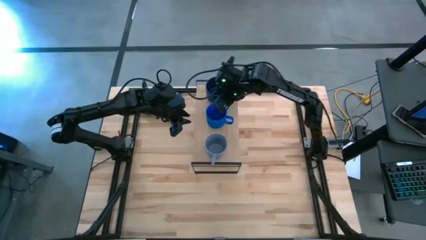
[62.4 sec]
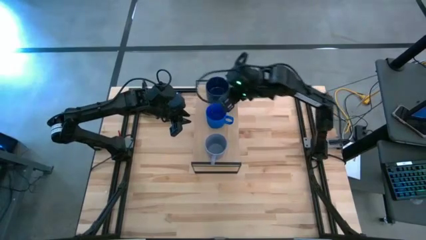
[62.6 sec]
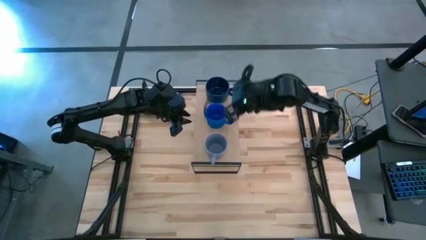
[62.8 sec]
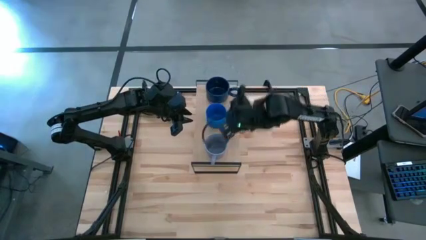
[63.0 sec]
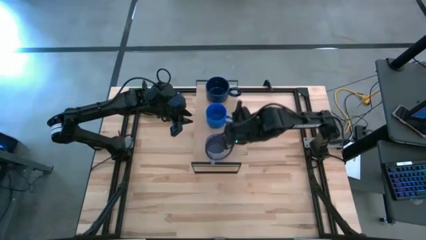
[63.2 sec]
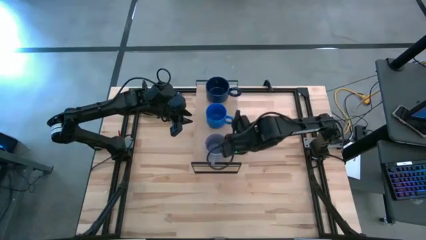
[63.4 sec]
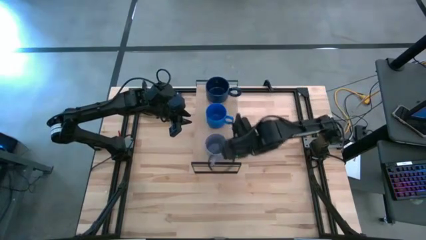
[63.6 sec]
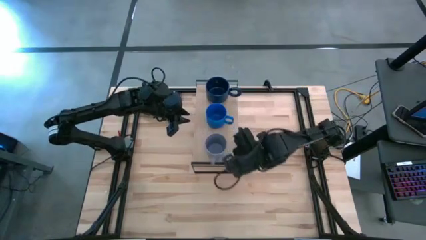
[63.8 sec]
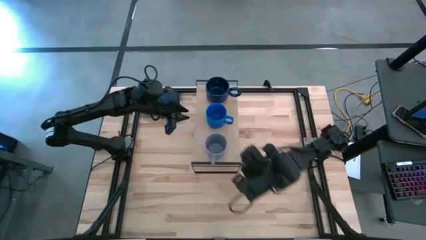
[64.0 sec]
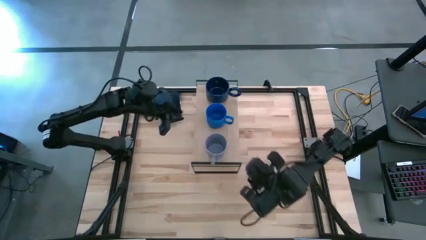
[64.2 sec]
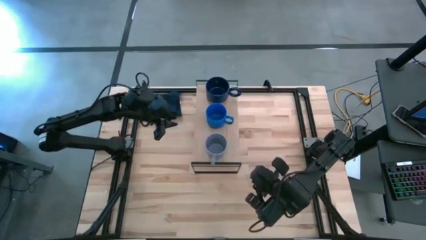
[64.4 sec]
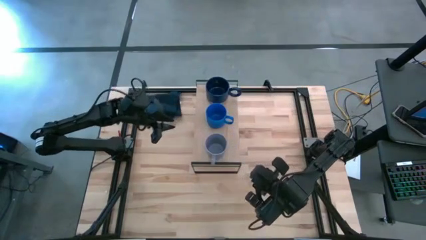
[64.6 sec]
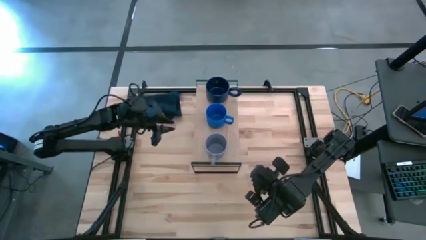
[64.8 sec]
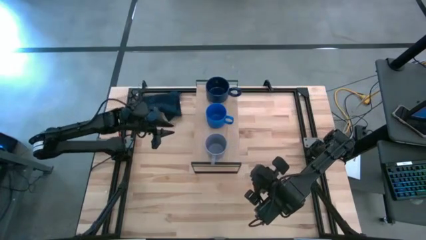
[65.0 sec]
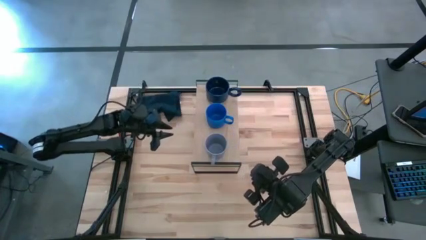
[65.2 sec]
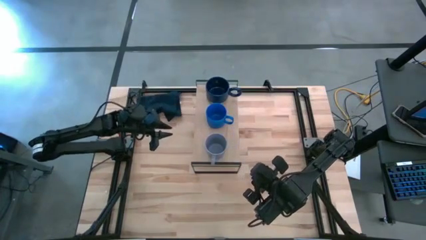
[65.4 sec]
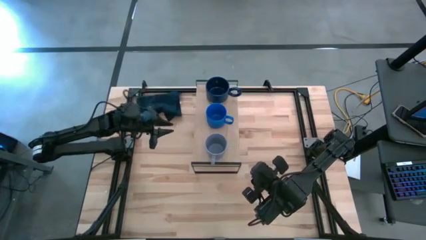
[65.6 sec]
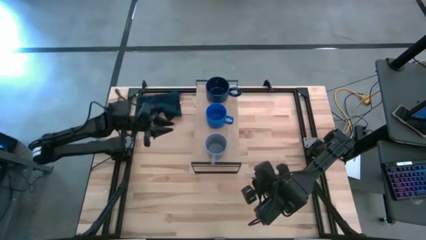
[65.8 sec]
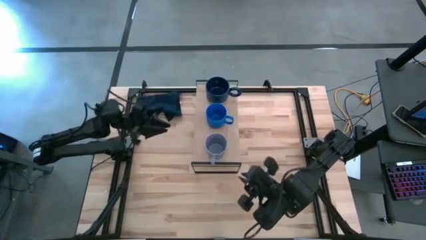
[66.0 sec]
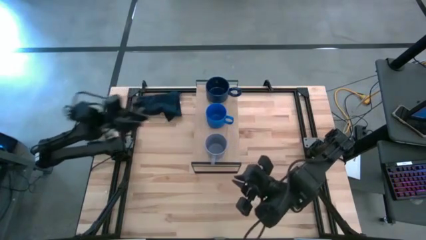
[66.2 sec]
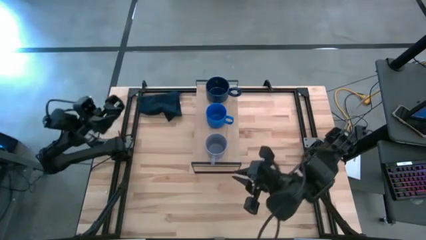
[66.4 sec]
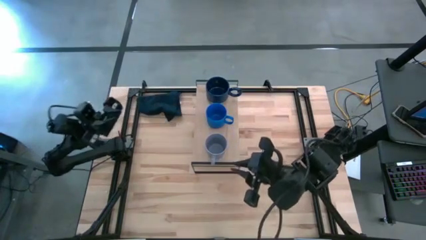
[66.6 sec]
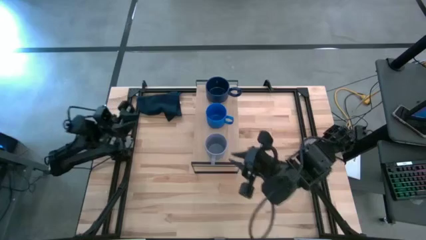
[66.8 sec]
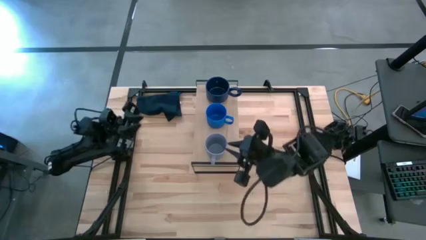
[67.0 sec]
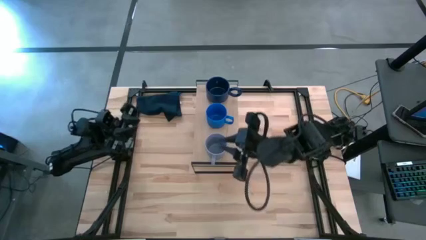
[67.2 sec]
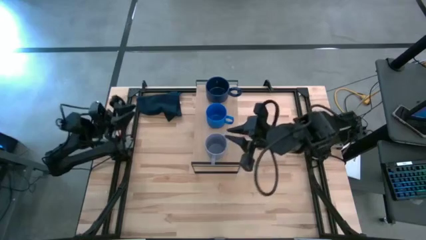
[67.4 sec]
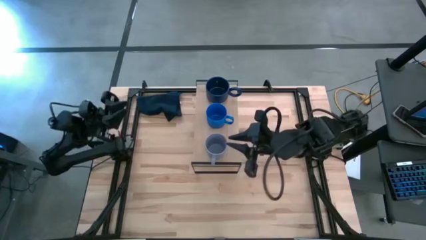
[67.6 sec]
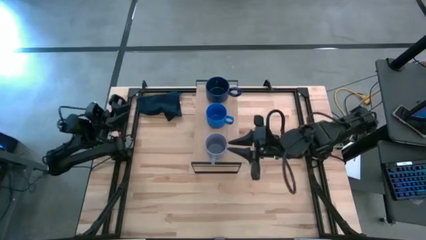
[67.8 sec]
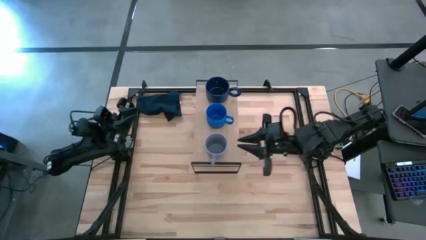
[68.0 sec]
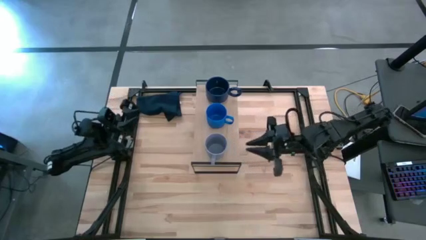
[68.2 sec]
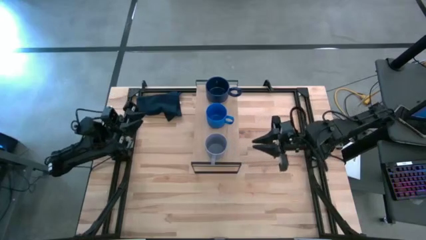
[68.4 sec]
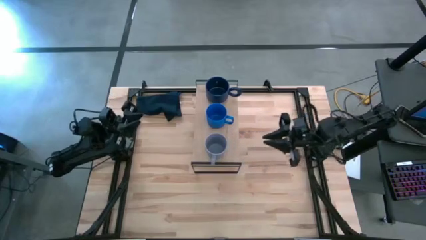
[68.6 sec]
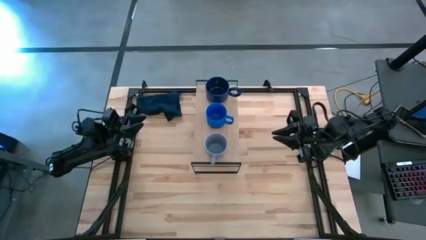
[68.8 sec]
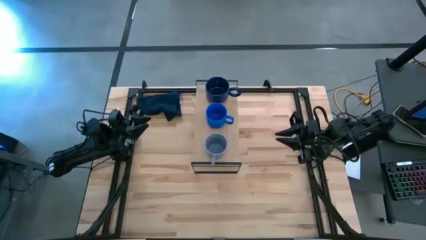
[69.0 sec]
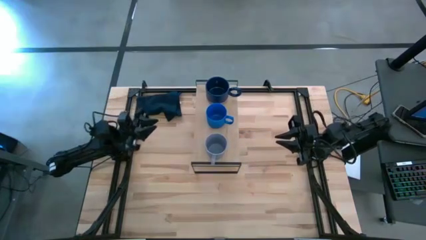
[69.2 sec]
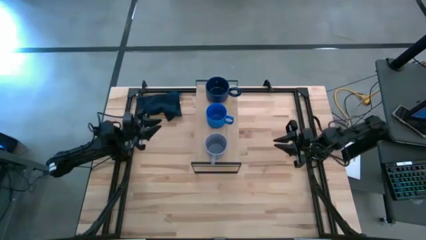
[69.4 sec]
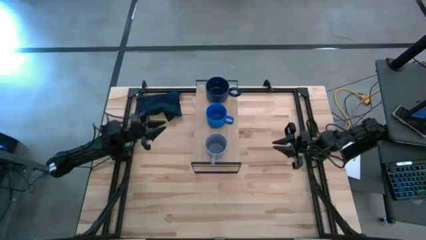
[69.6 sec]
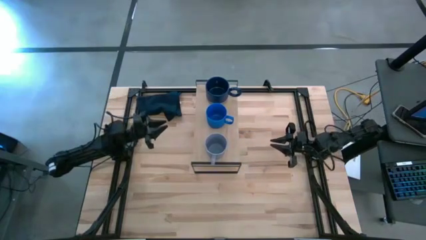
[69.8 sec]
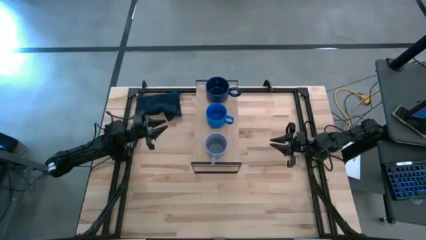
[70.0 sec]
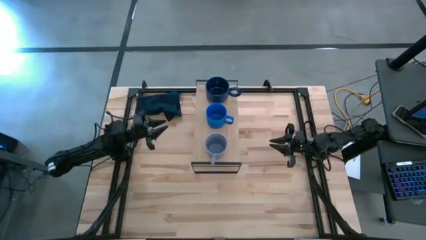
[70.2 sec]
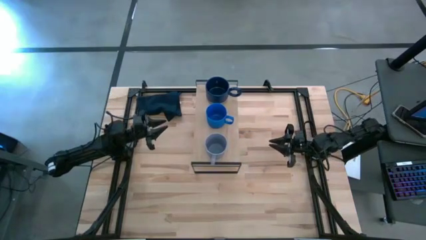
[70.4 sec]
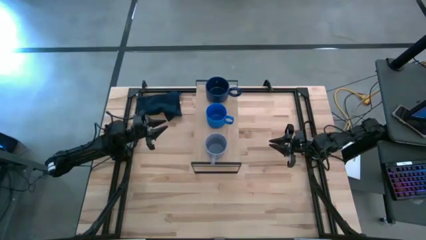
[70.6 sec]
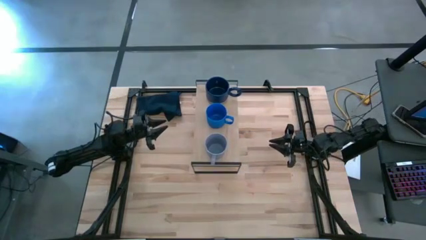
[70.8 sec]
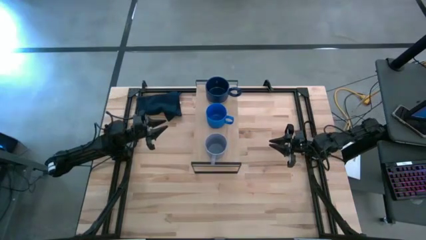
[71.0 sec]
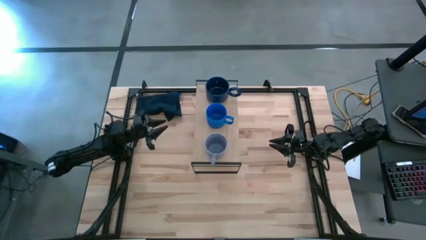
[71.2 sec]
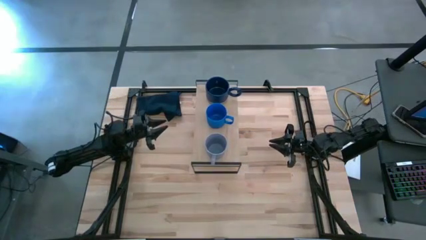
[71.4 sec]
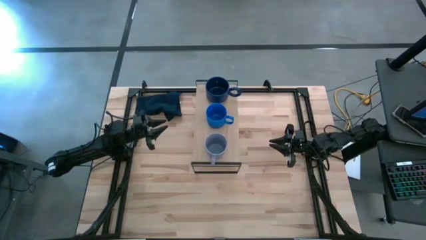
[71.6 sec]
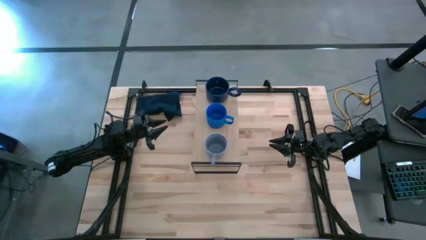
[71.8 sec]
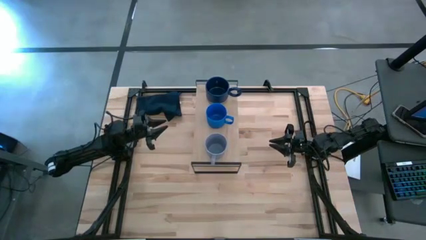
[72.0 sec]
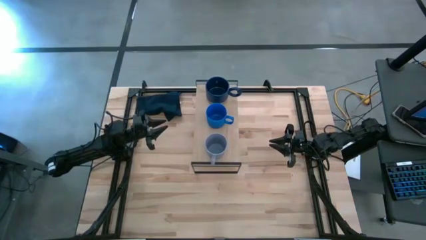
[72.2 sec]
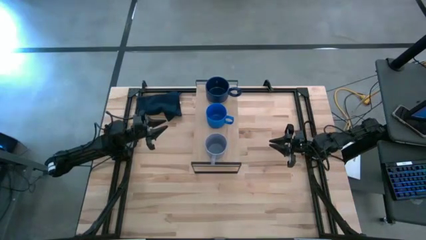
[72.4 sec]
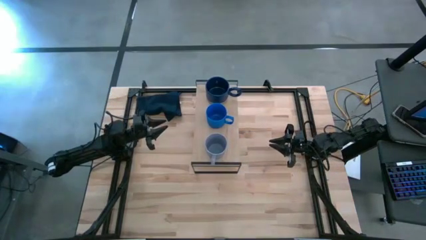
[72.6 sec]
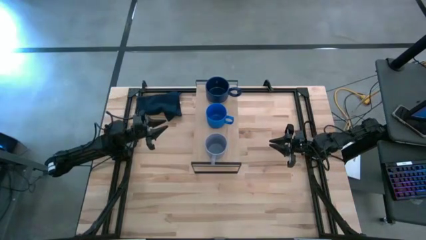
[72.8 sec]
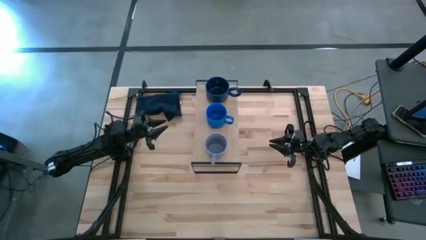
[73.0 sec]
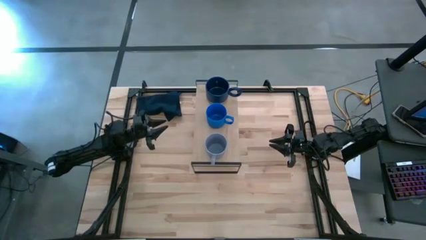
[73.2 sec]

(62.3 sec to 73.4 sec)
Task: Stack small to large cups/mugs on shelf
Return to Home Position

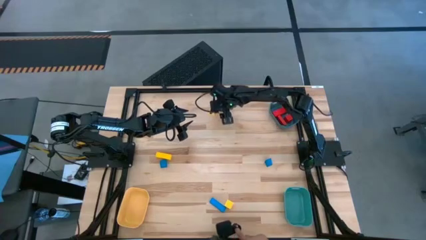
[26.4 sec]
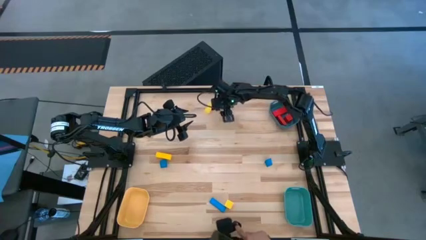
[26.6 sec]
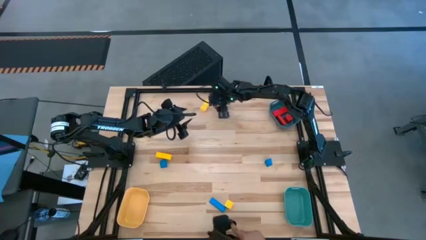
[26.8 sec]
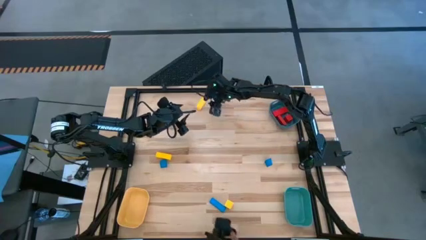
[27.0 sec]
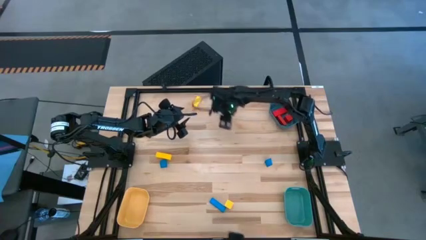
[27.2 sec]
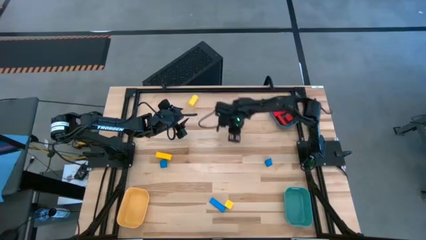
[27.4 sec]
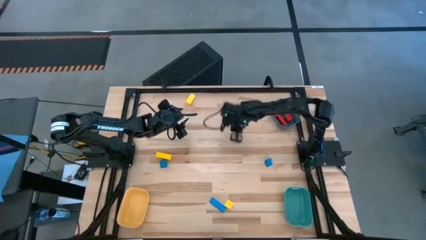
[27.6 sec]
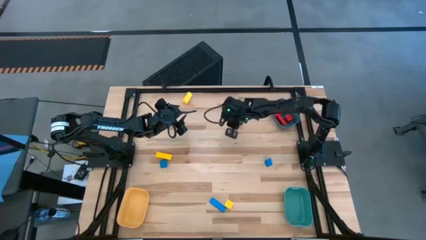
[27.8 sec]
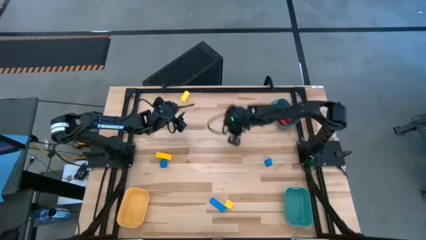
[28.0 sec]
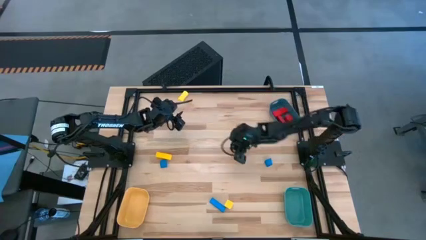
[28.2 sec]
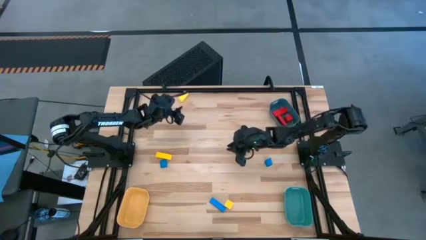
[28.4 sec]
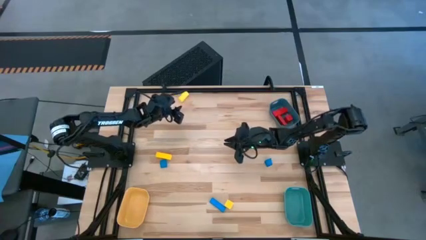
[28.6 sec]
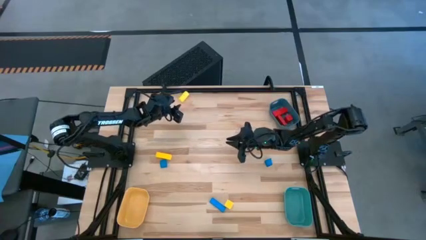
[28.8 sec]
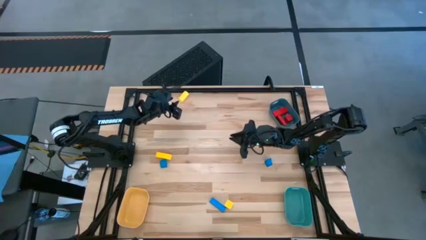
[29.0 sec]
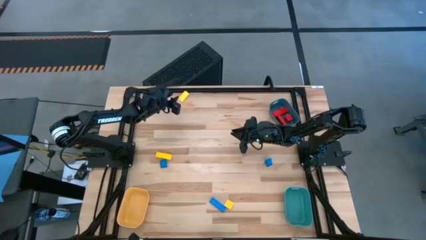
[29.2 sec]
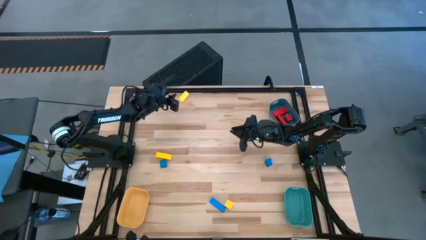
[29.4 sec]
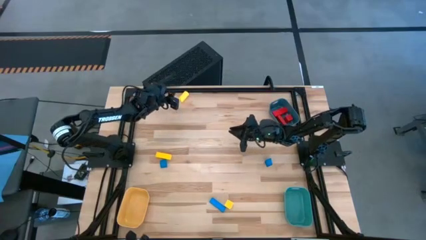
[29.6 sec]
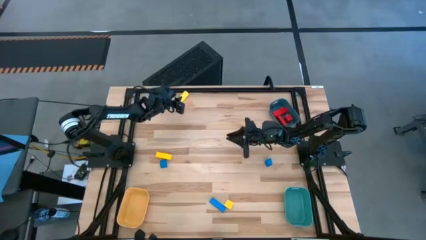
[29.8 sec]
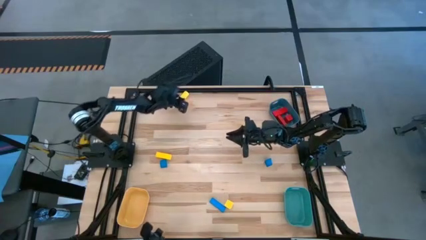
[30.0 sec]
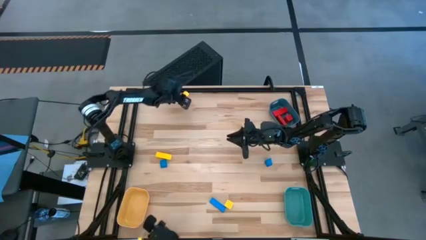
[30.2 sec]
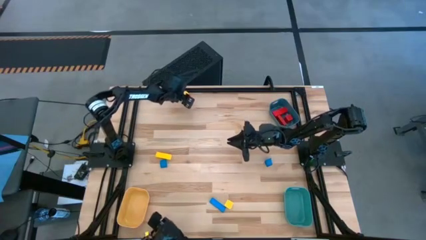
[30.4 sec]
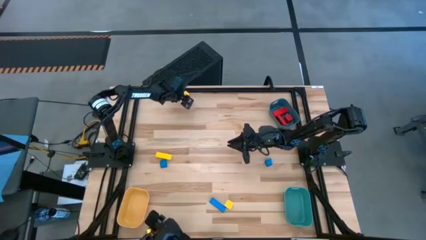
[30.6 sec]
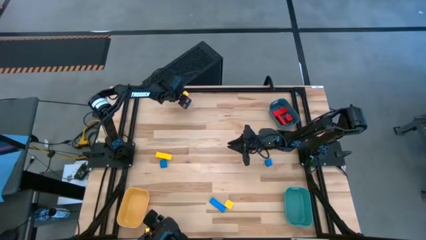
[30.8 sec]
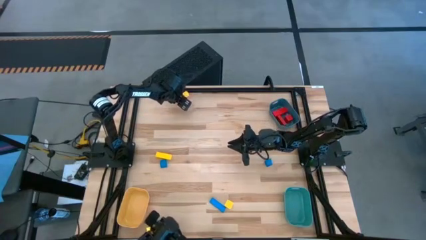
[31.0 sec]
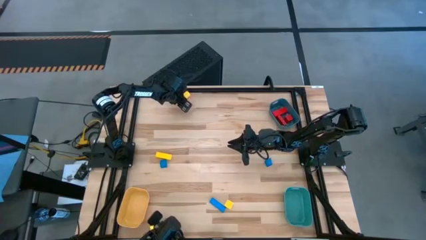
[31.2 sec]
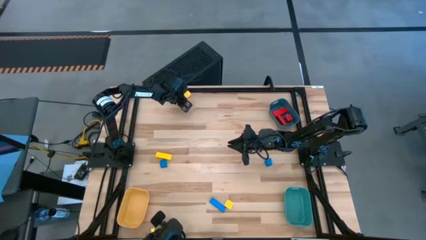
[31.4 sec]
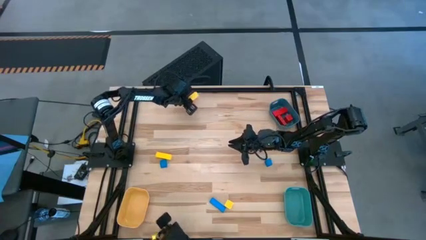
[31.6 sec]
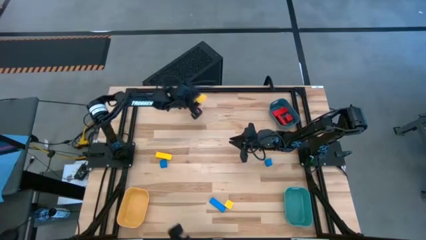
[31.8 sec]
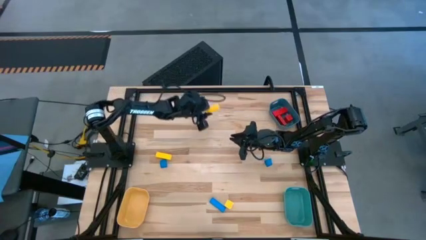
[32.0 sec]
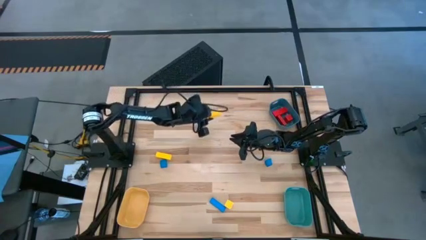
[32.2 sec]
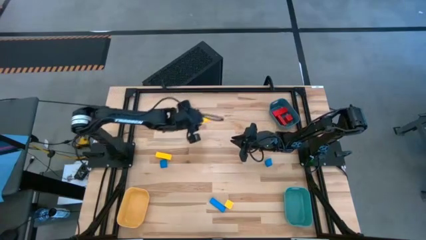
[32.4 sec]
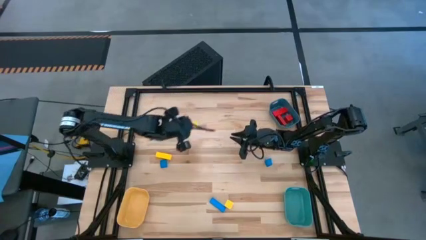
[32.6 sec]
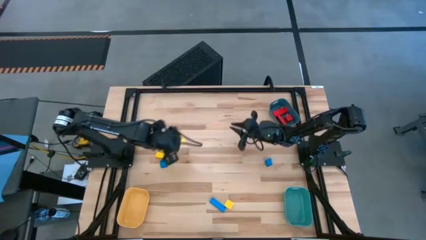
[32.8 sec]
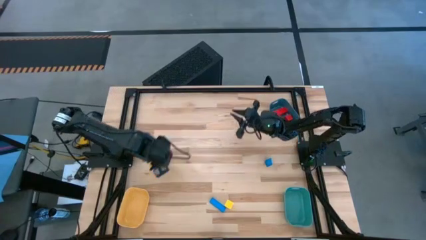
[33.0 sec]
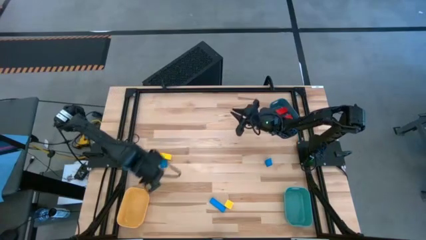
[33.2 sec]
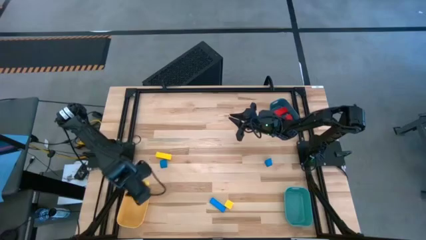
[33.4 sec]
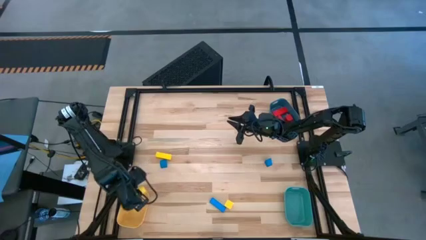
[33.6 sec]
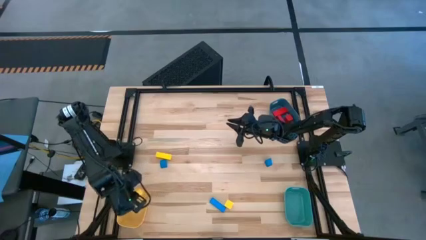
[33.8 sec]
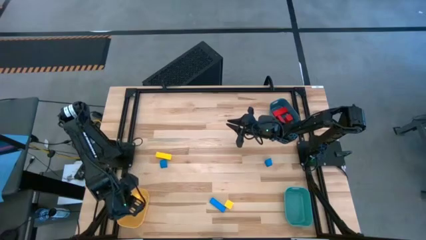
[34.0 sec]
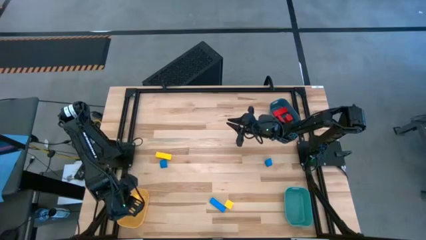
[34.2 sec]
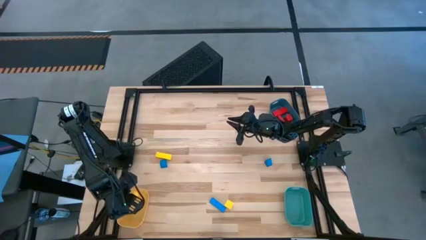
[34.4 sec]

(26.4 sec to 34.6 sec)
Task: Sort & place blocks by color
Put the top yellow block into the yellow bin
